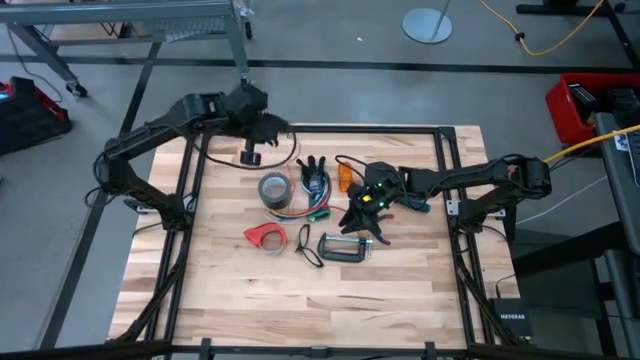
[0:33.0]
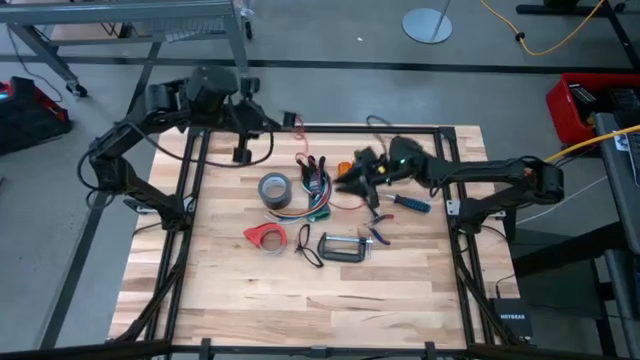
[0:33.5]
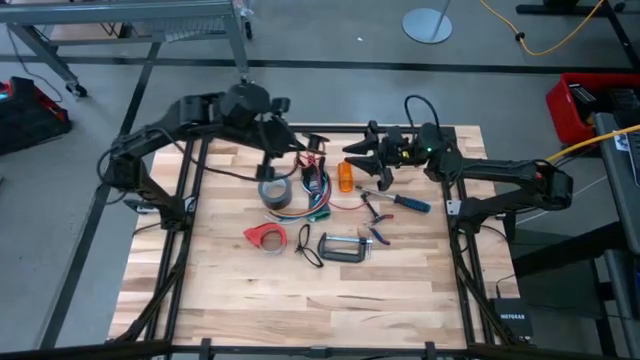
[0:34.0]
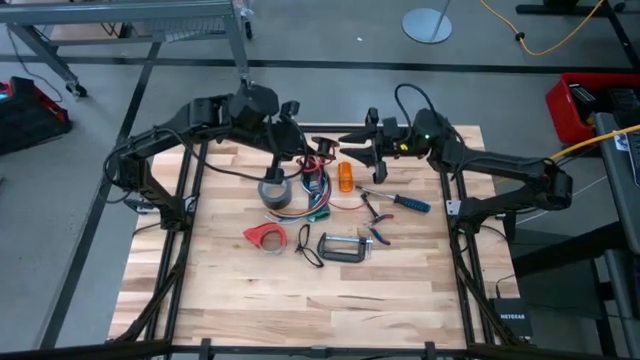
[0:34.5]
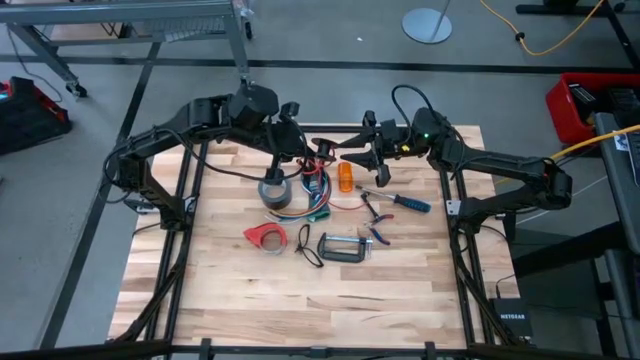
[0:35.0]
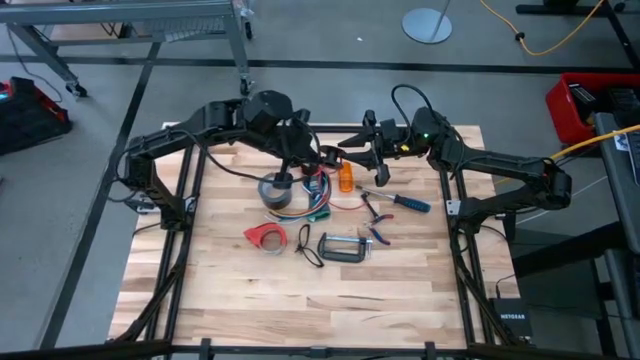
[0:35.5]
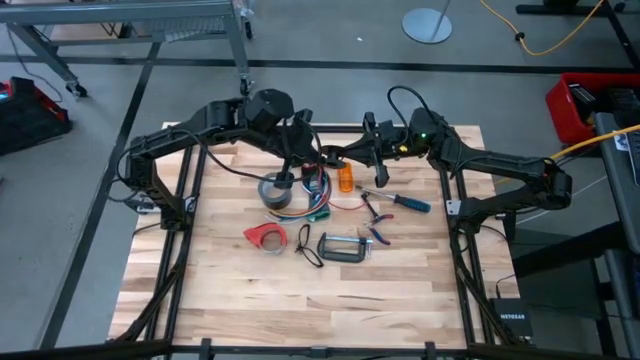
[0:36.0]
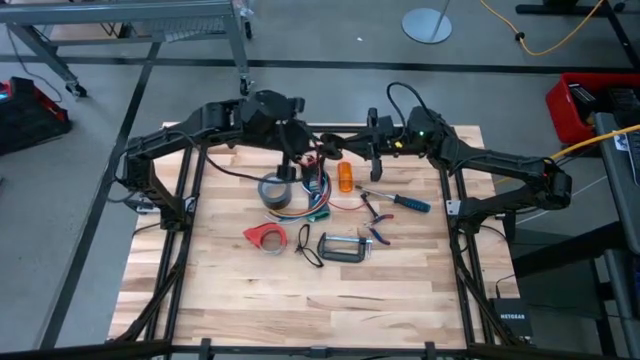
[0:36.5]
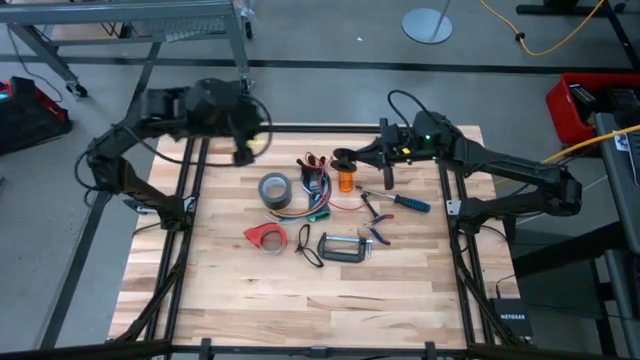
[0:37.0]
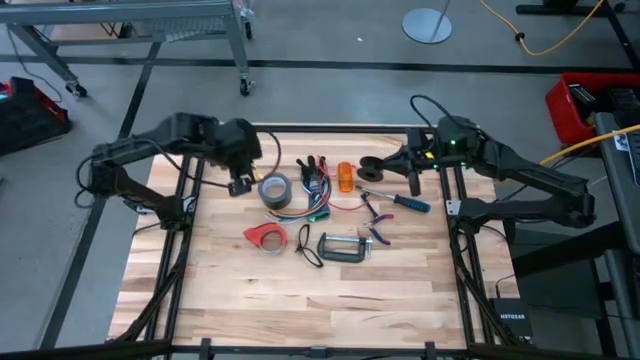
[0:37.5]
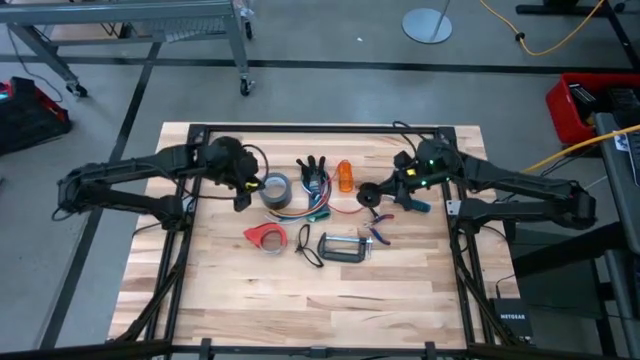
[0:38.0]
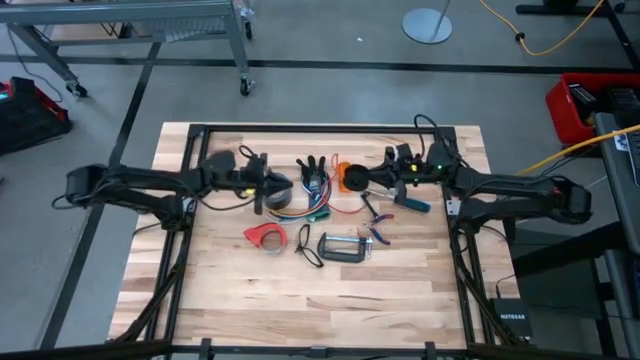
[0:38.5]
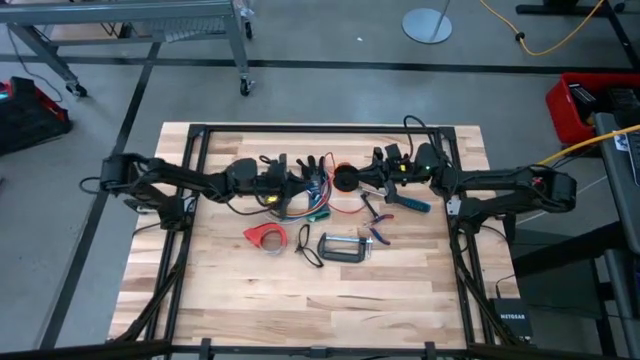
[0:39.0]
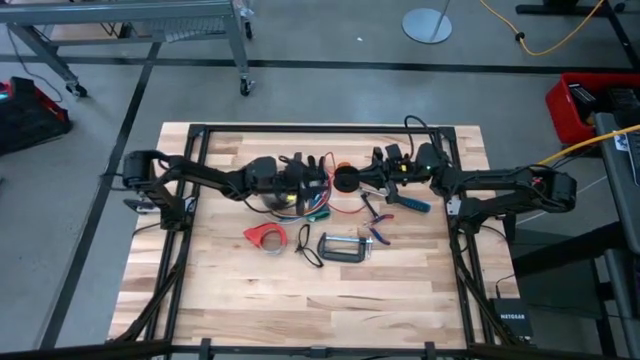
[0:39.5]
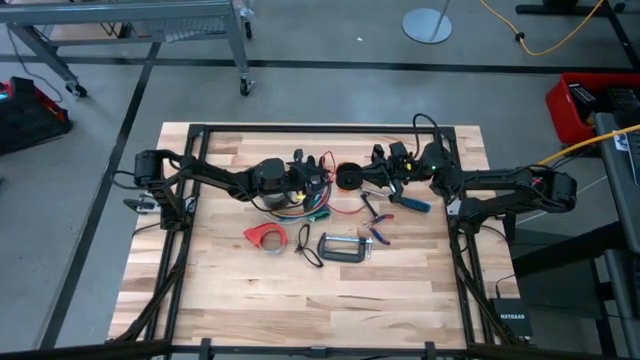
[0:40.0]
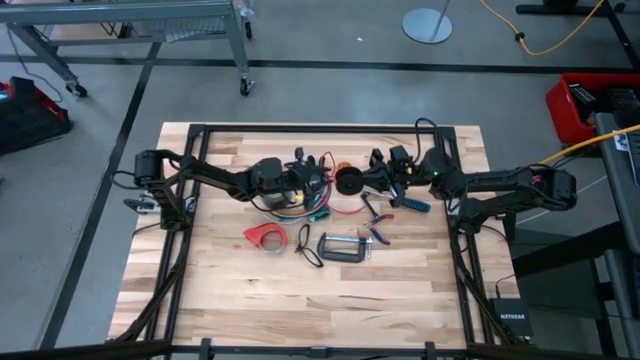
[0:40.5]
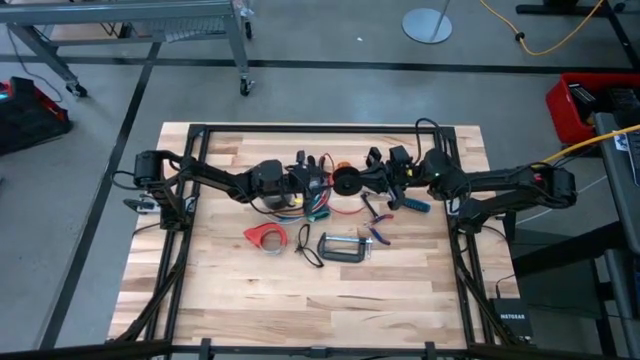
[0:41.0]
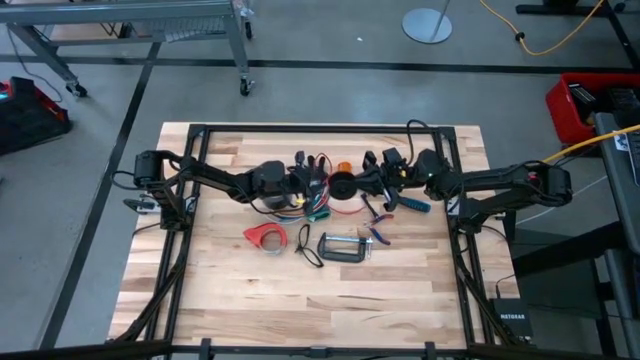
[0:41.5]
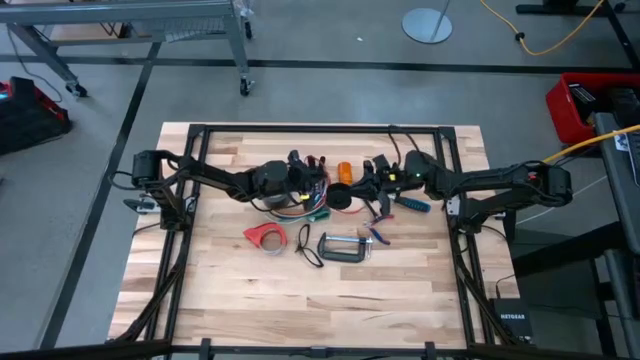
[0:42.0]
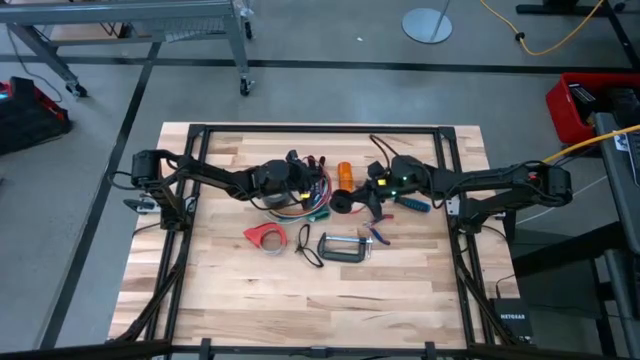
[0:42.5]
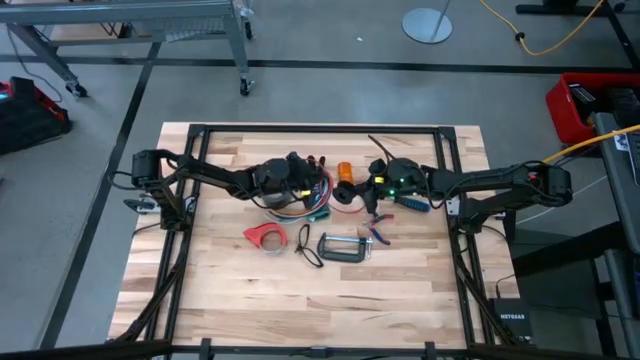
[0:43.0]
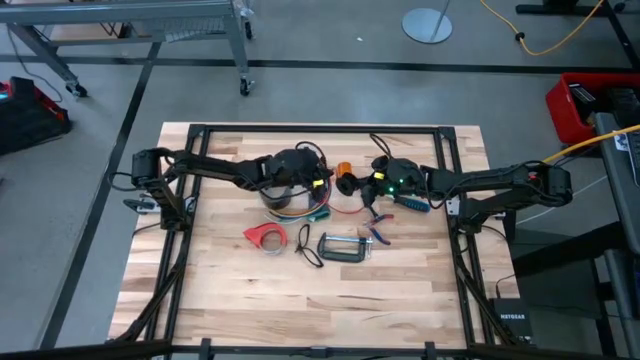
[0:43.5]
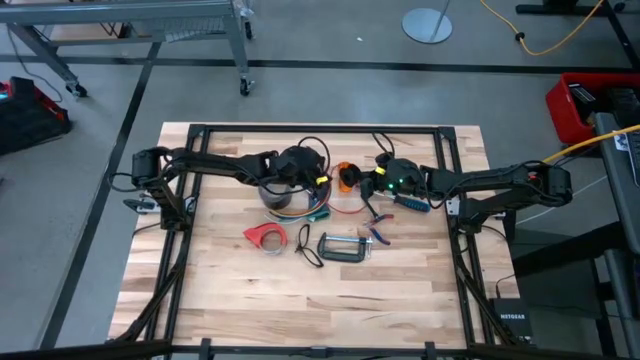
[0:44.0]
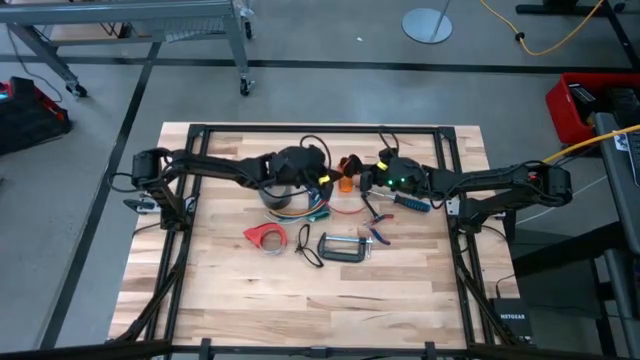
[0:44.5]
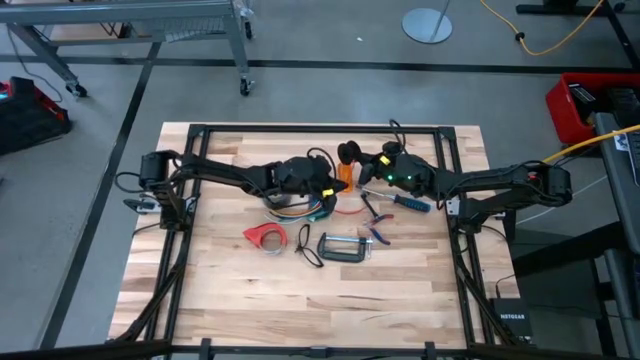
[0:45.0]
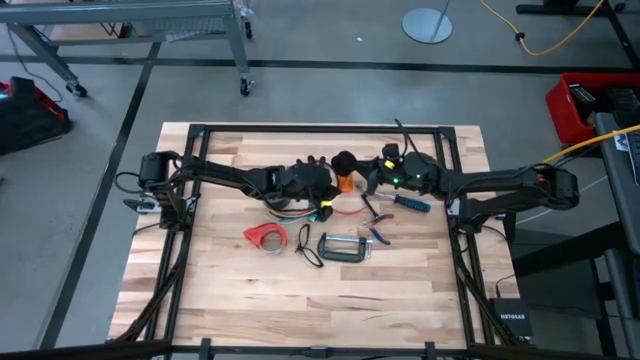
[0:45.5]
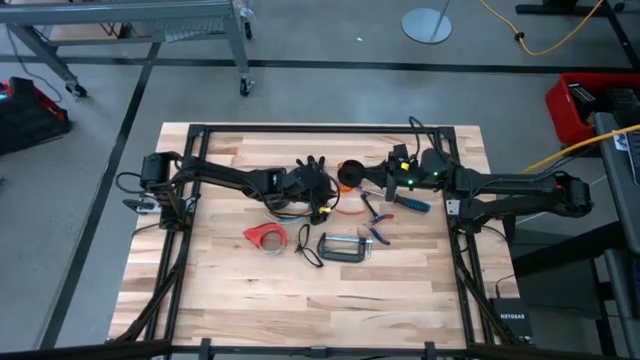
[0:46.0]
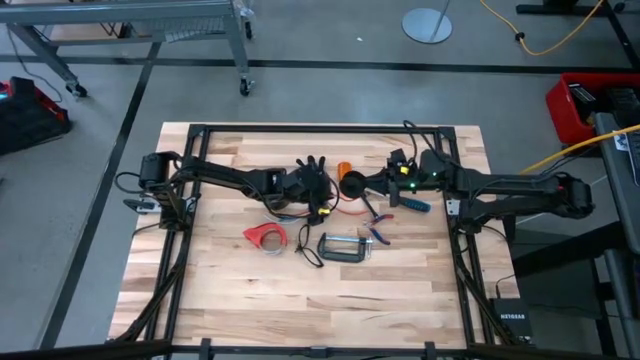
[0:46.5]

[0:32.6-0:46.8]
Task: Coil cords
Coil the red wire

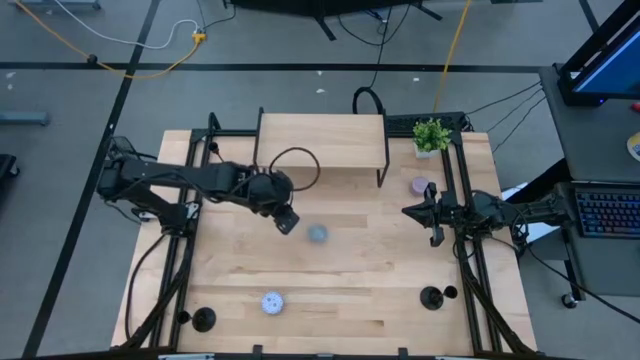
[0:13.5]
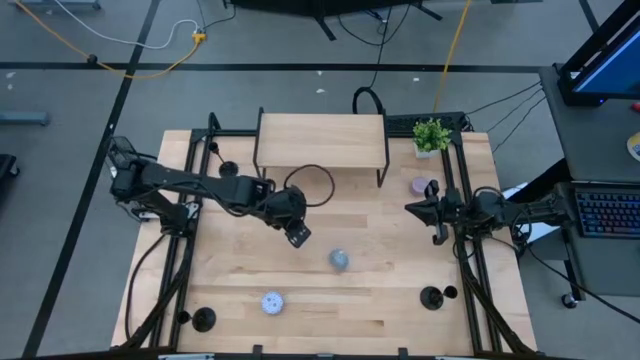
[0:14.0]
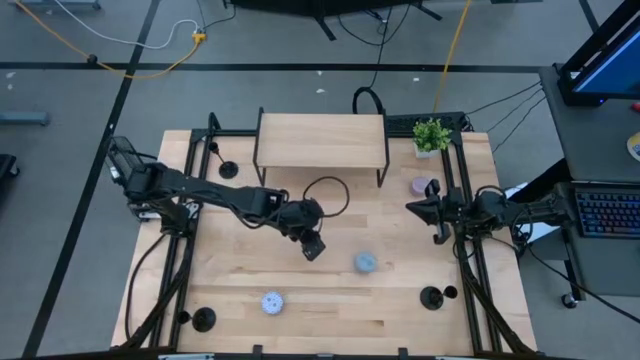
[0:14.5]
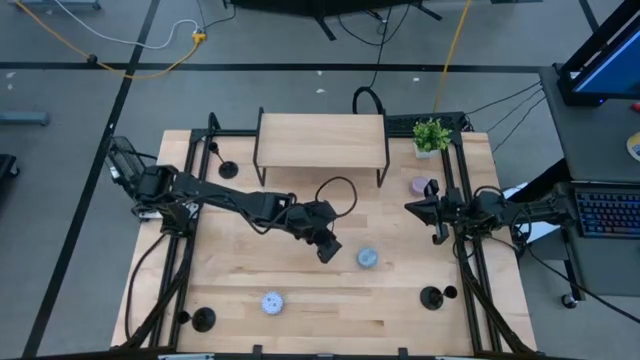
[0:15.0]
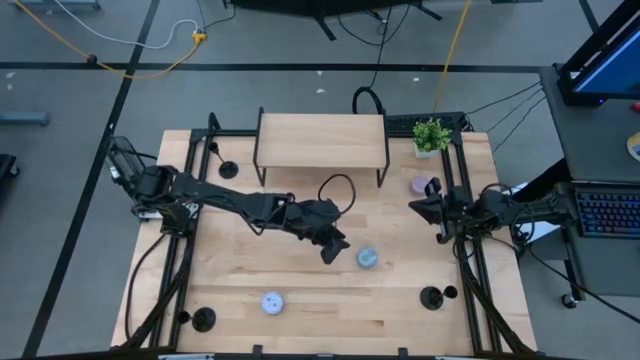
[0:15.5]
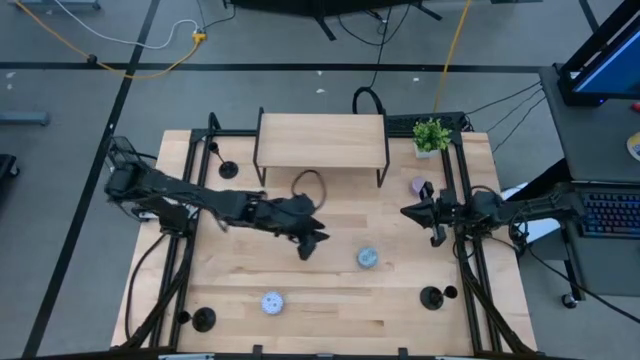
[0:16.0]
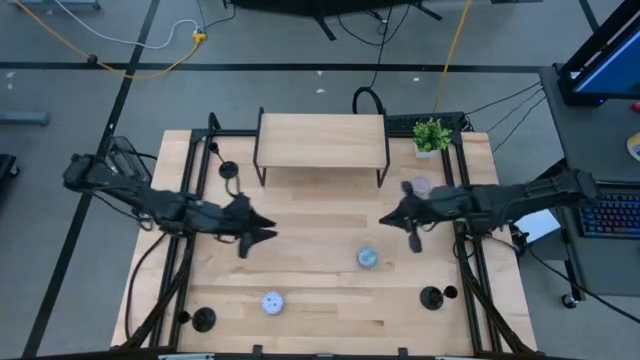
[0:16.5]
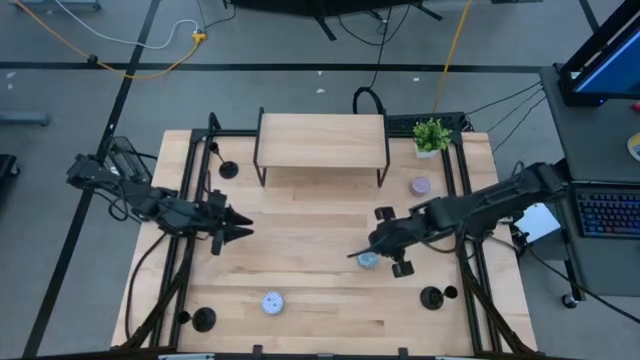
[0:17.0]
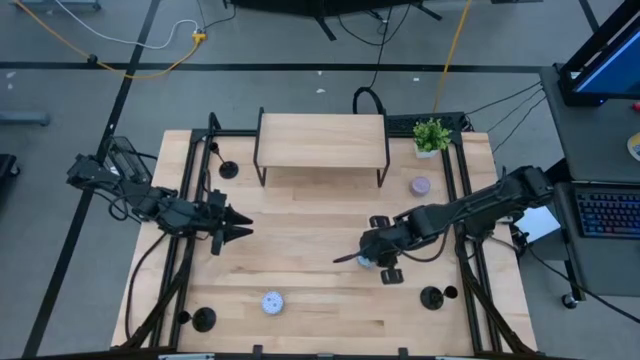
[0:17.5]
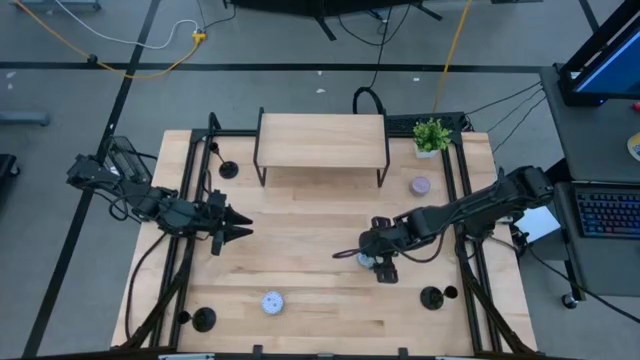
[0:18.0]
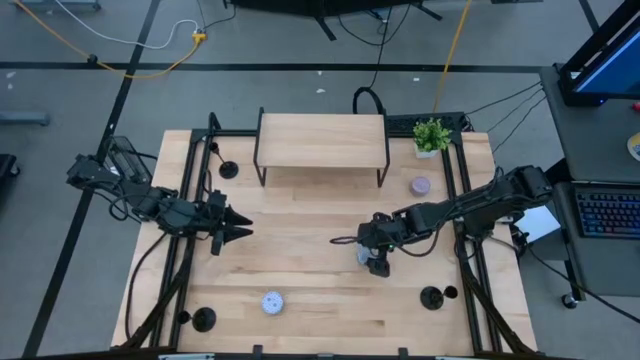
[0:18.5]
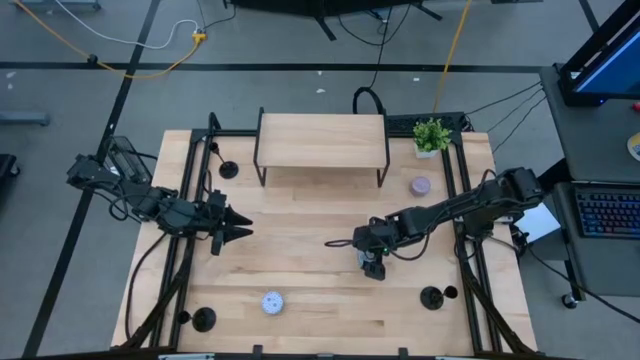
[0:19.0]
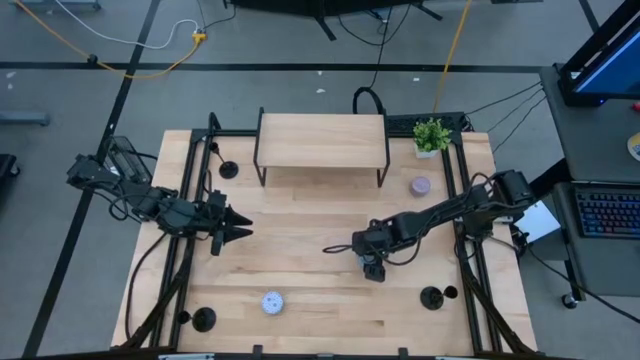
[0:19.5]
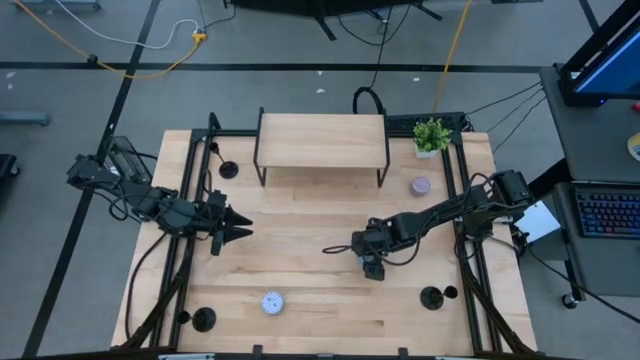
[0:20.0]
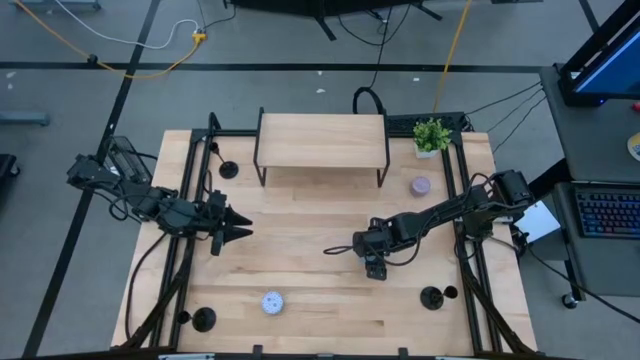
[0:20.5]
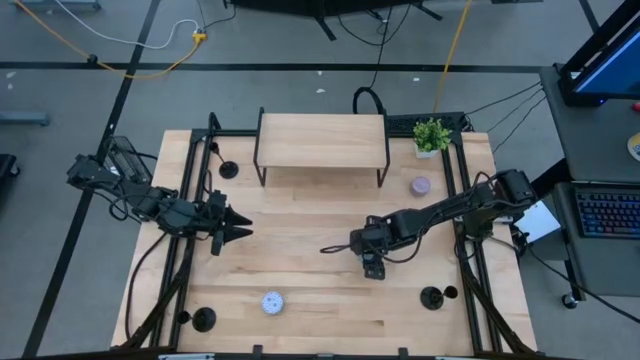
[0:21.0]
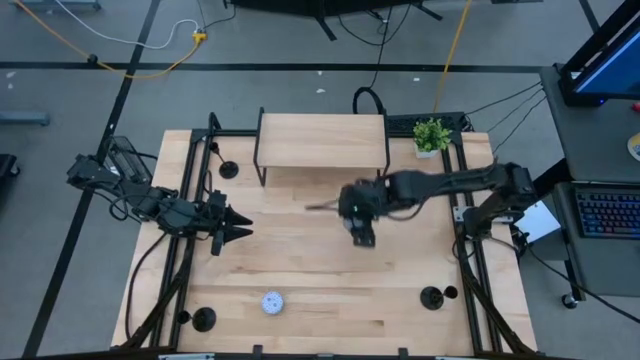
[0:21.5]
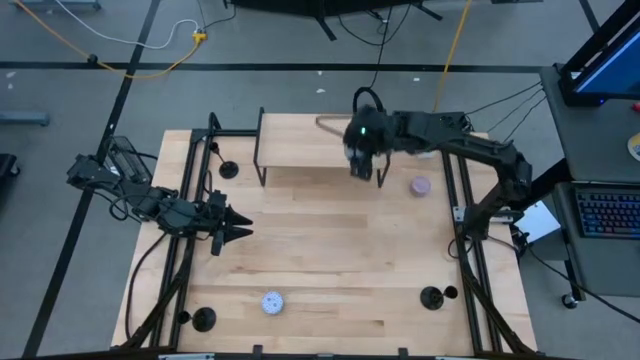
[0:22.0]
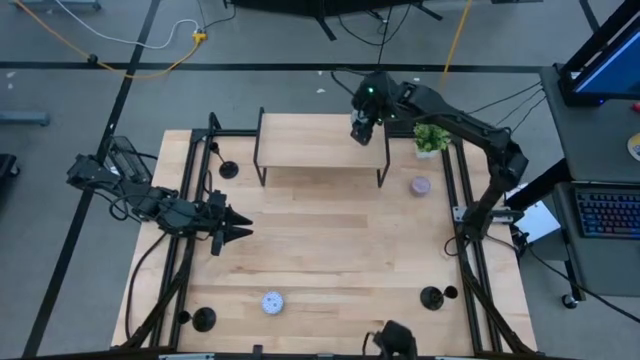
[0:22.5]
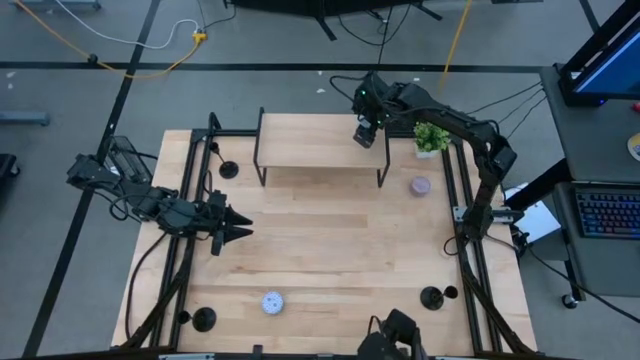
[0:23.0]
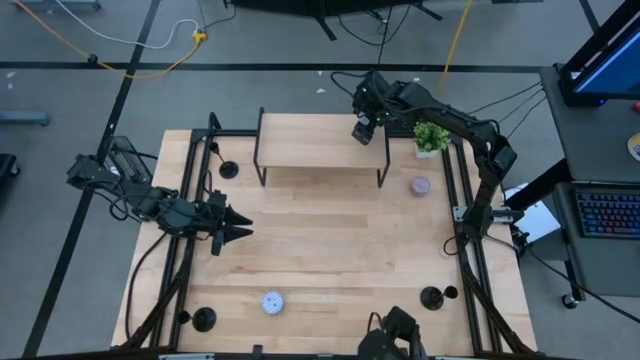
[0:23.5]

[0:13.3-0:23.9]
Task: Pick & Place candle stick holders
Put the blue scented candle on the shelf
